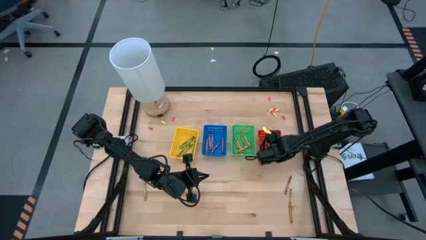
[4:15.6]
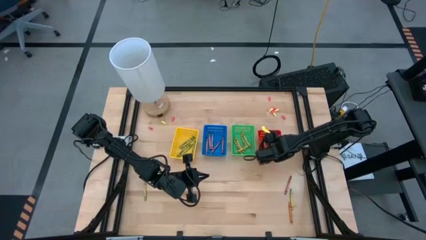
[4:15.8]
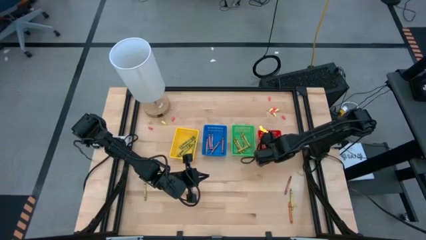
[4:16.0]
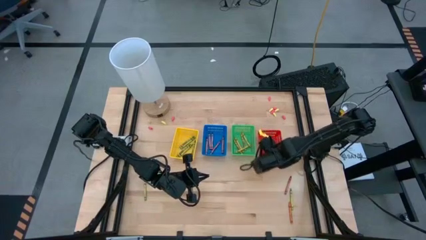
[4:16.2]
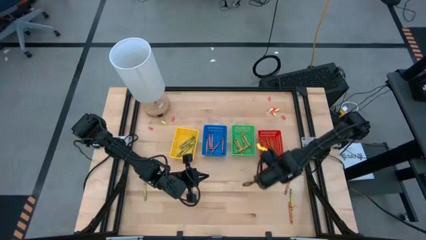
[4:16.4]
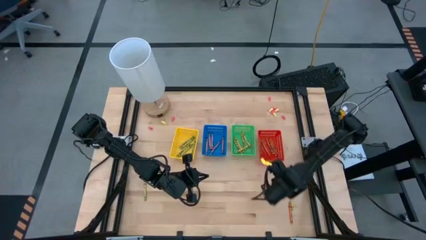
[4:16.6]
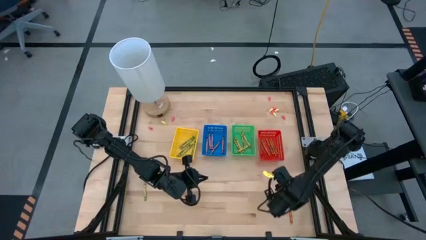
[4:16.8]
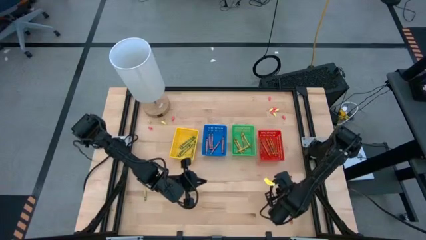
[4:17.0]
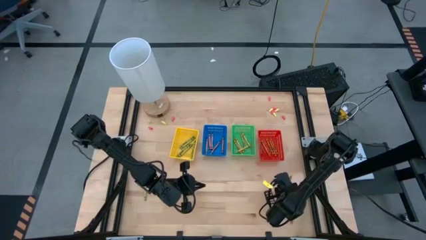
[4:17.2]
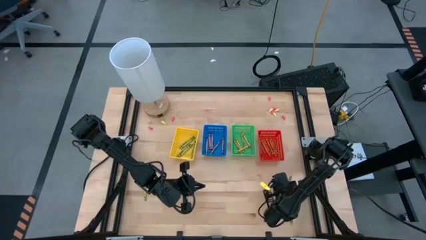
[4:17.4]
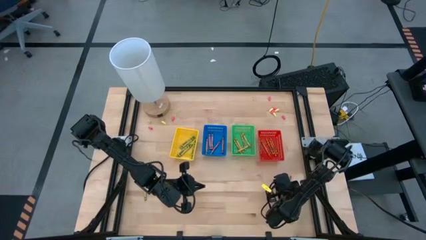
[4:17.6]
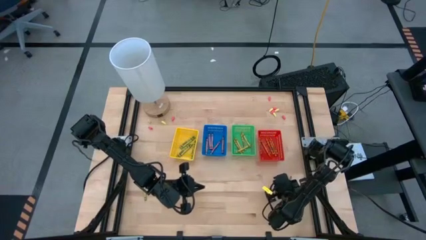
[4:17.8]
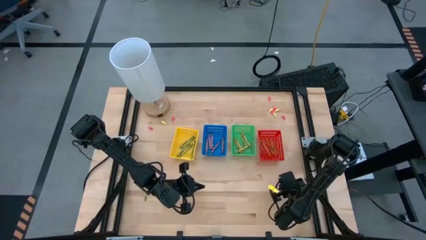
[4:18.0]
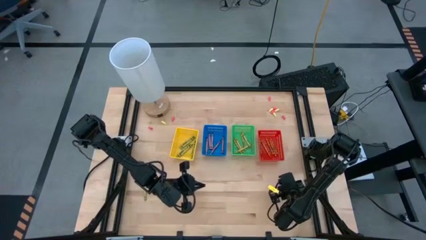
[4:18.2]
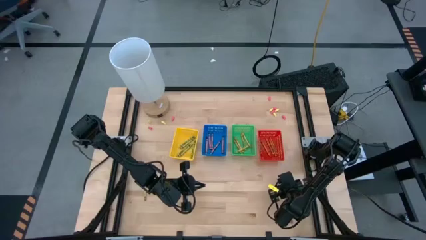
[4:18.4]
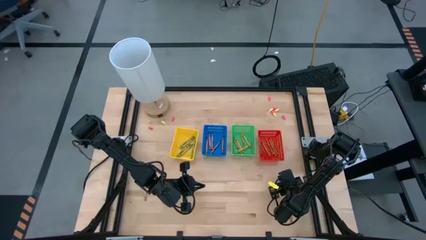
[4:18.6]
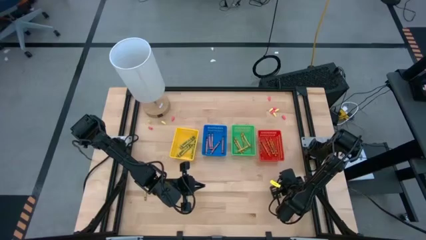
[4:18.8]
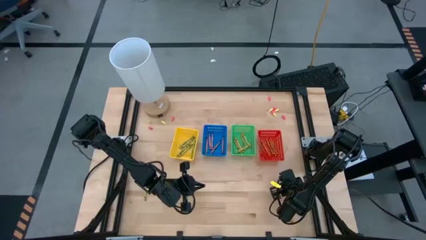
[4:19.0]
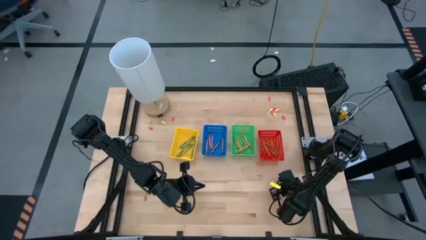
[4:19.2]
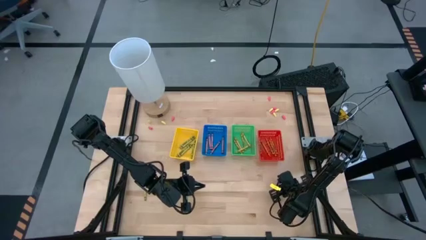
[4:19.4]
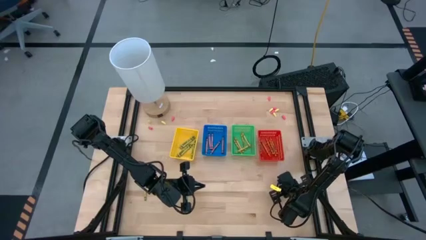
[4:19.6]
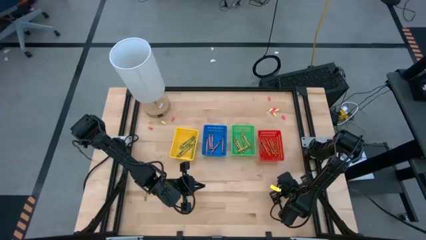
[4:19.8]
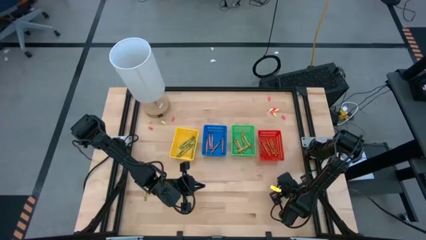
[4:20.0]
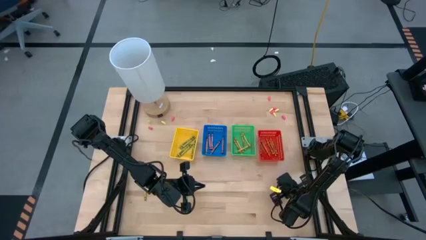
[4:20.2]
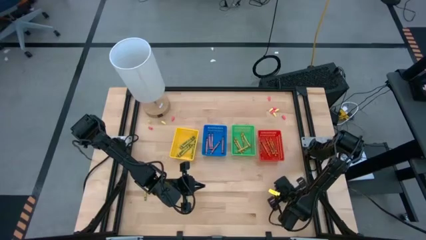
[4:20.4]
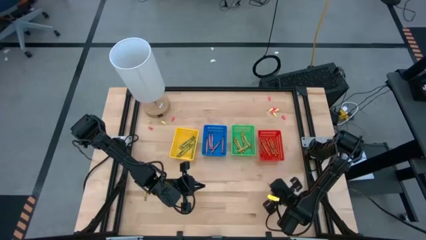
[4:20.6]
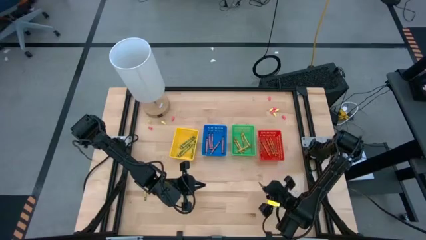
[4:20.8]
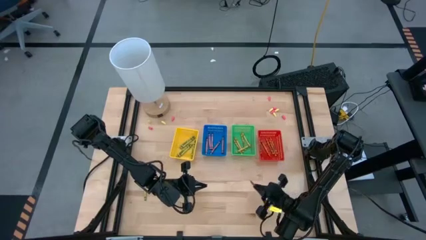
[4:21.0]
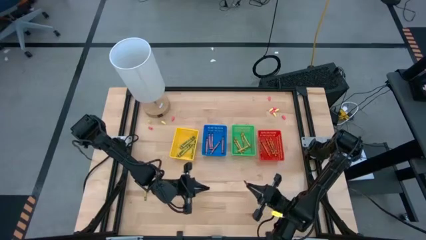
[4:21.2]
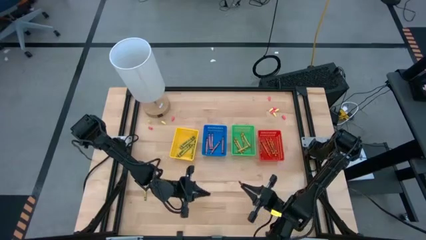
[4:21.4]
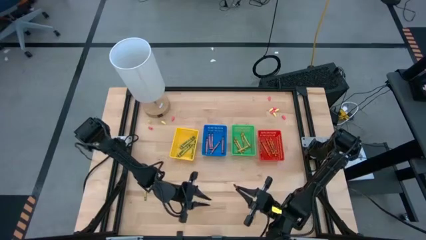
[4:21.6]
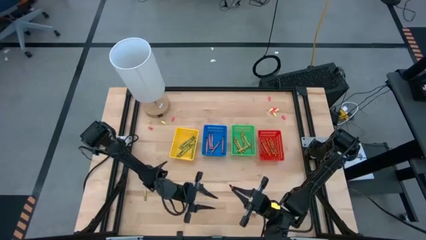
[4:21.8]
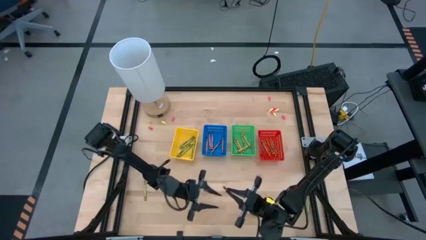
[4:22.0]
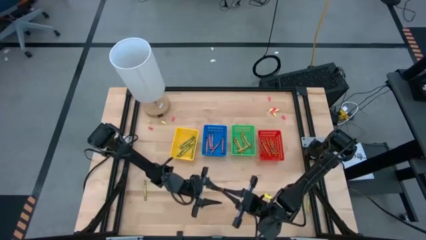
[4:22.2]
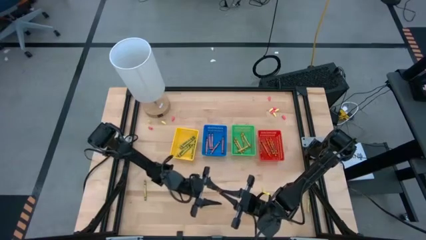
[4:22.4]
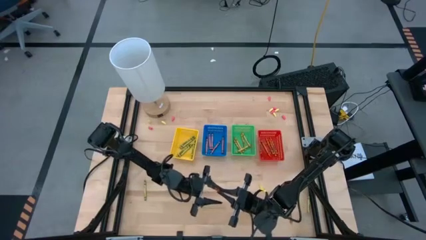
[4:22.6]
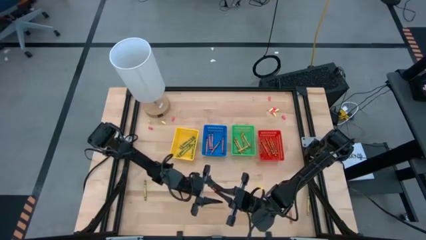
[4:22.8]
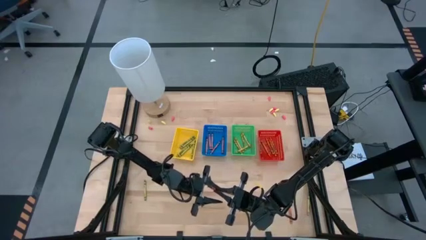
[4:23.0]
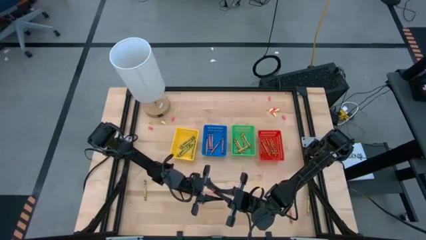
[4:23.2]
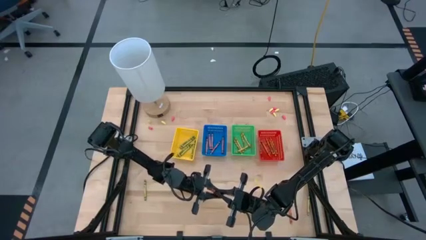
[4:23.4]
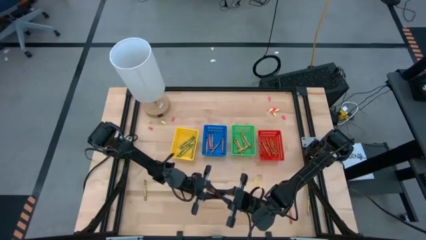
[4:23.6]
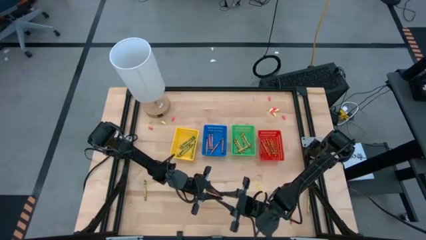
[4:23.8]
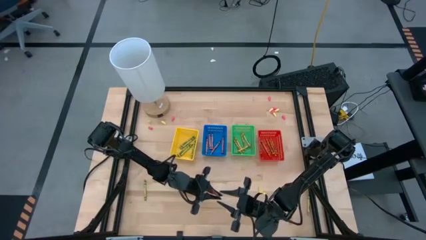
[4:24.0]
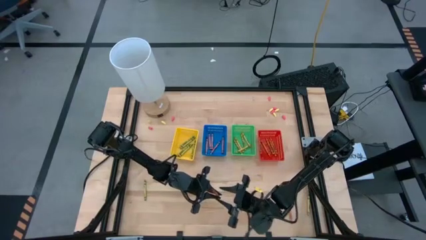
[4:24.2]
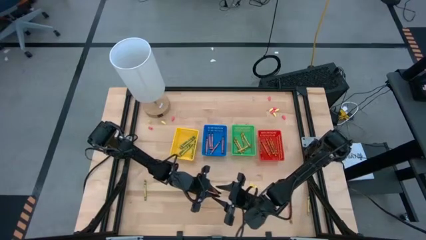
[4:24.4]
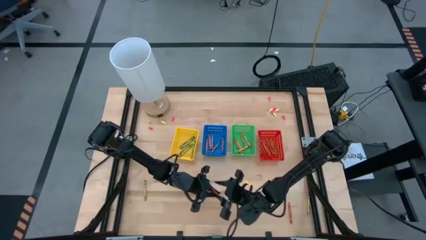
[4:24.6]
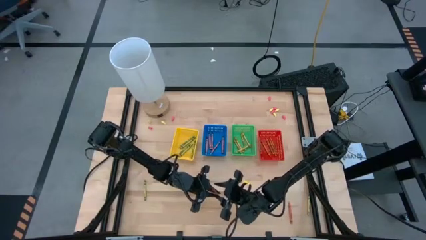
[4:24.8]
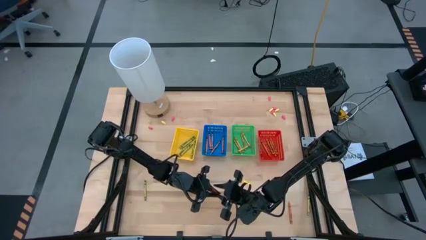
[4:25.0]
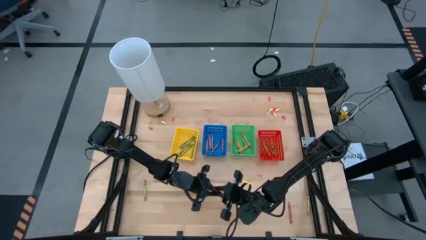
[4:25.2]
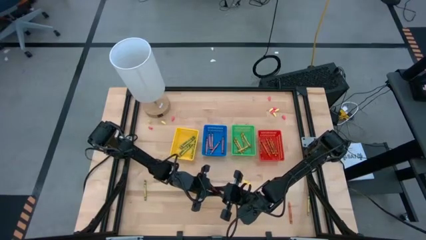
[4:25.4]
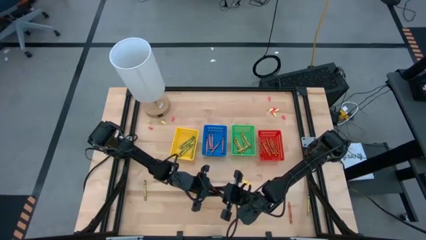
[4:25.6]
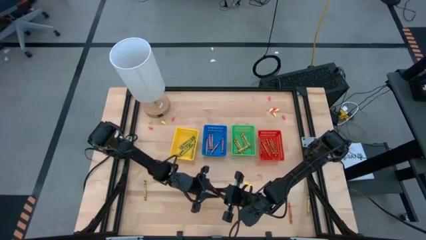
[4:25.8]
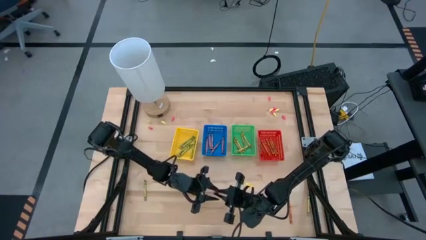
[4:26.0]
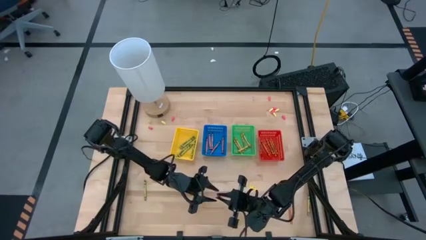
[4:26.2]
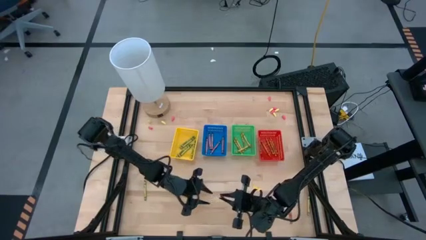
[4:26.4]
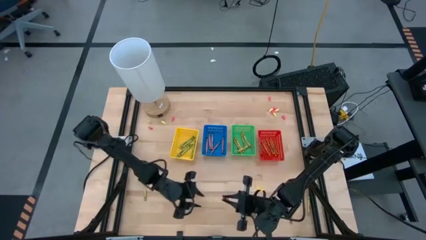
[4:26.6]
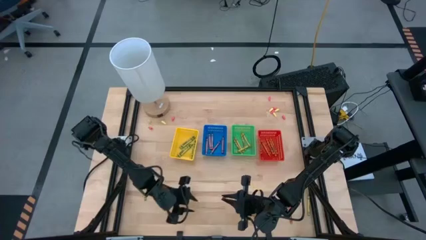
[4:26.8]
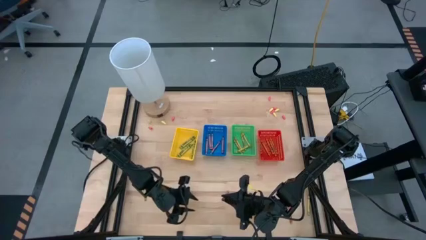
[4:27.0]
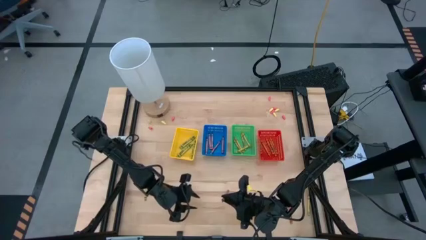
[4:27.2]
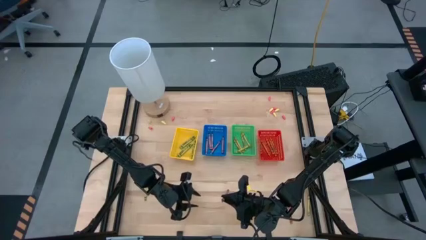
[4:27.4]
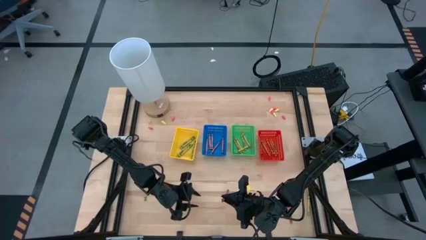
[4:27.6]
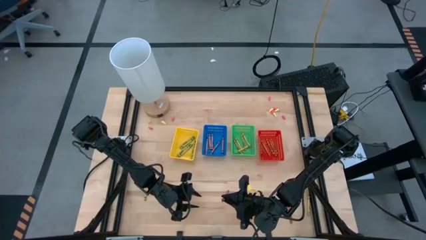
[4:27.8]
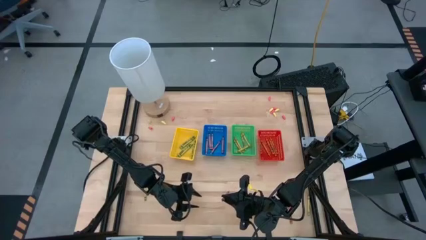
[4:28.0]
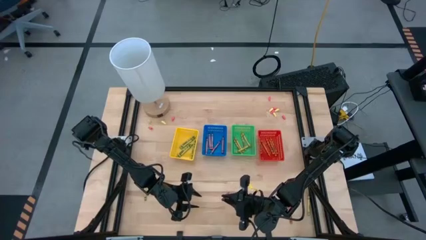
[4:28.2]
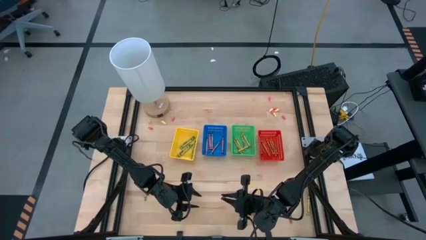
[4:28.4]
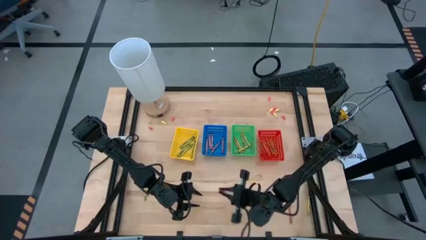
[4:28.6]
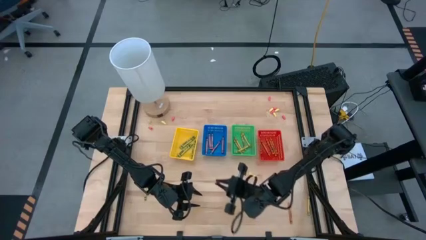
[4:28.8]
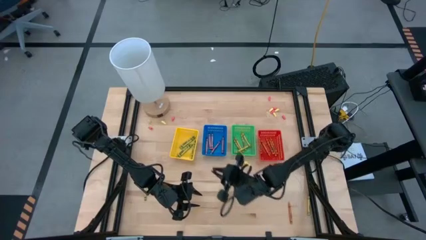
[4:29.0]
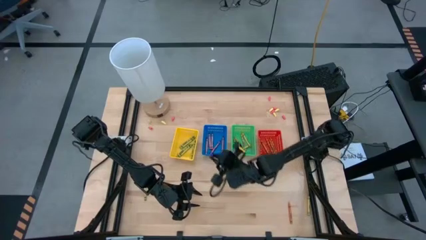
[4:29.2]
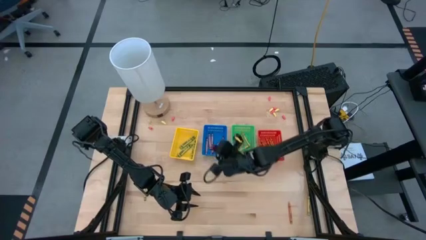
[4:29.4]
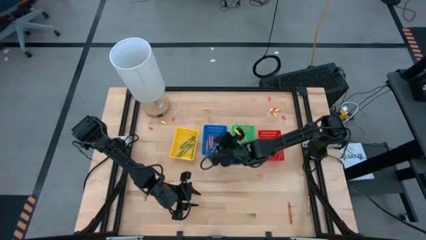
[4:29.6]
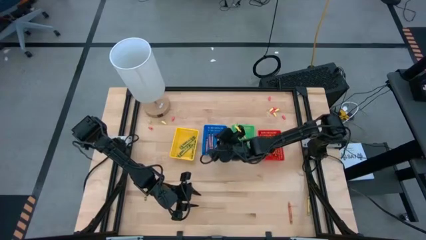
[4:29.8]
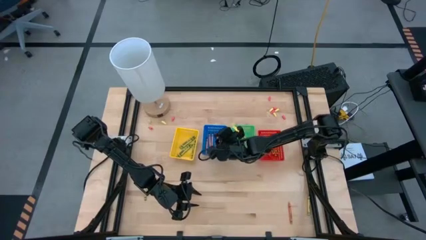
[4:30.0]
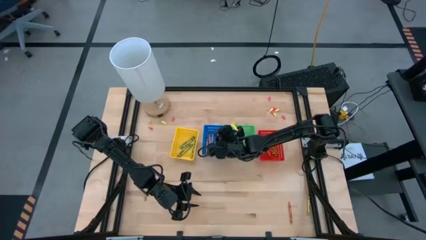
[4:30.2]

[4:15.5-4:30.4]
Task: Sort crayons
Put the red crayon into the blue bin

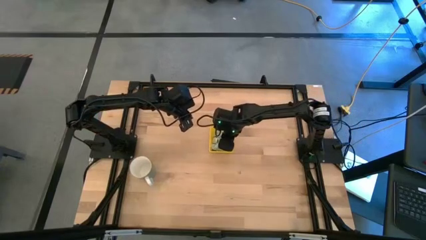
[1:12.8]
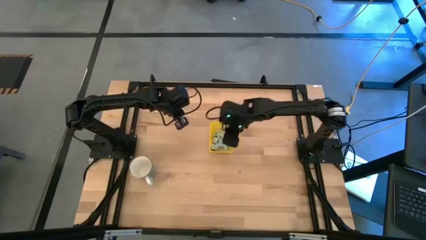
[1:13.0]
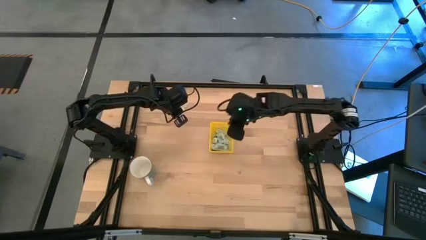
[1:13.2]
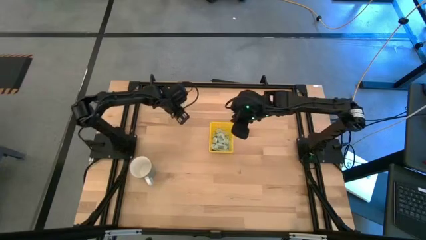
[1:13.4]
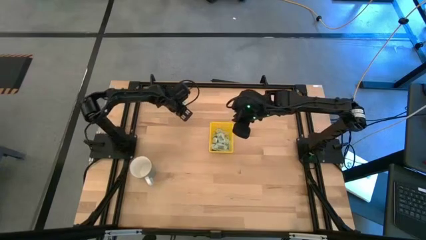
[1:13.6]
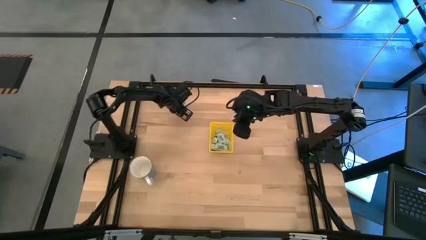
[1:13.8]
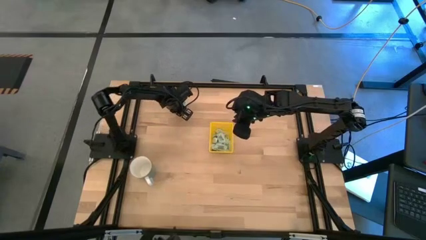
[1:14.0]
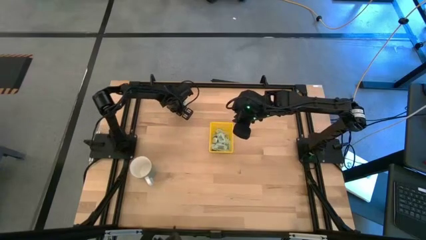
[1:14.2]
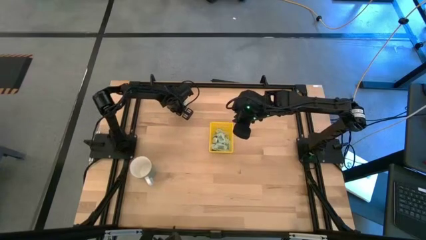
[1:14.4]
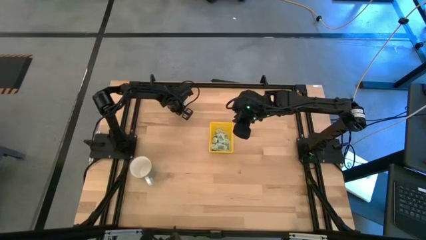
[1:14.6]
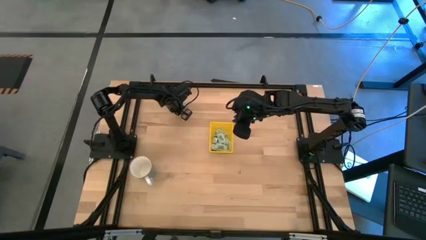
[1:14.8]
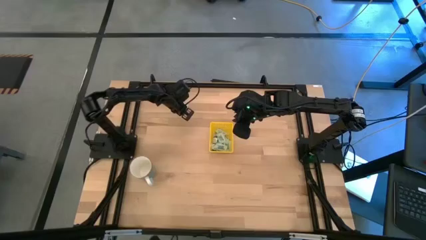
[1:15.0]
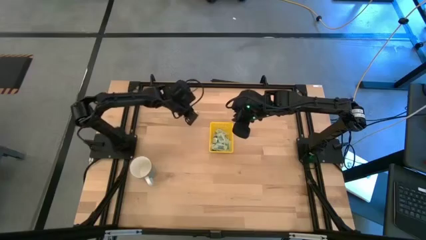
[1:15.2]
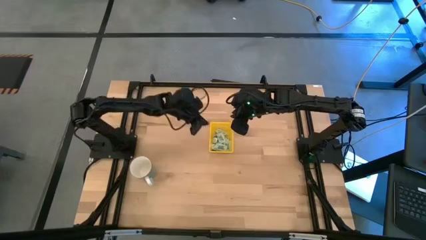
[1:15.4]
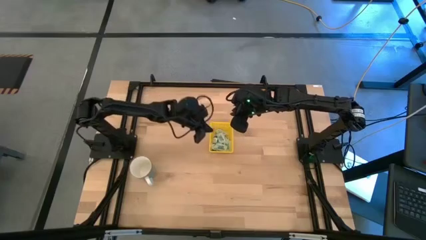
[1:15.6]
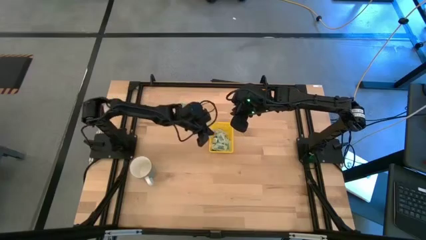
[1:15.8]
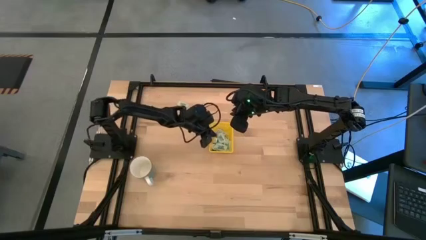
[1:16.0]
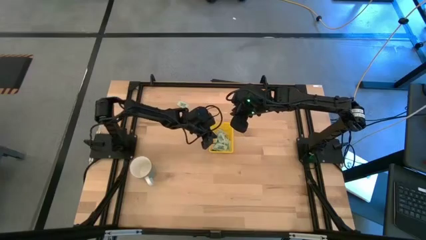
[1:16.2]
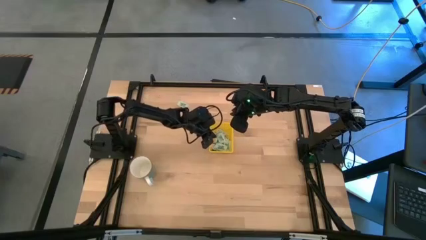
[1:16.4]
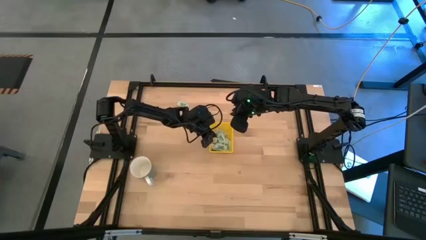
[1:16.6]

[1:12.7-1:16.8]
Task: Pick and place Stevia / Truvia into bins
Put the bottom white stevia packet into the yellow bin
